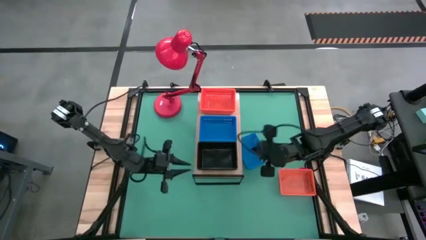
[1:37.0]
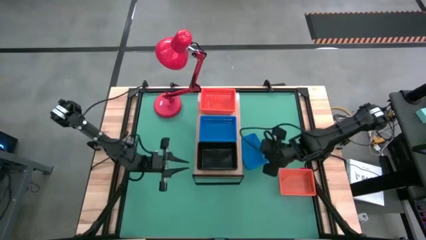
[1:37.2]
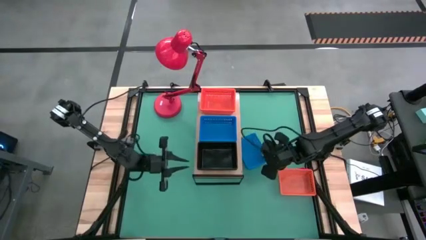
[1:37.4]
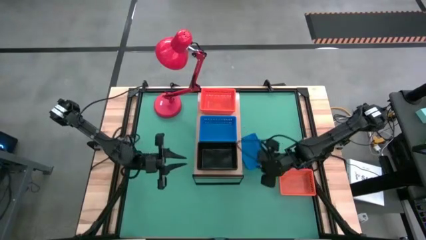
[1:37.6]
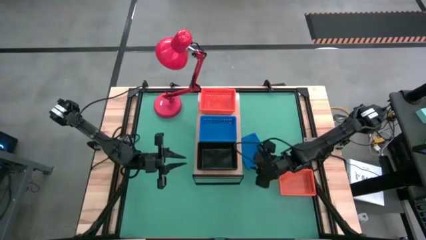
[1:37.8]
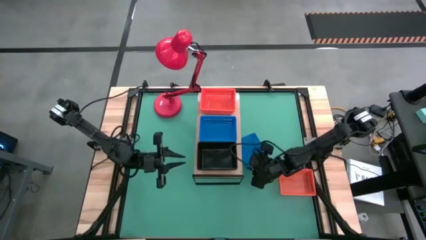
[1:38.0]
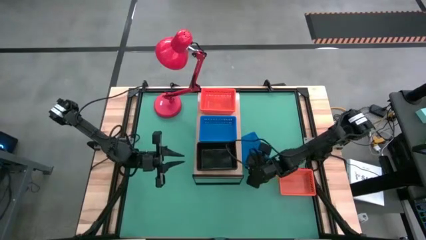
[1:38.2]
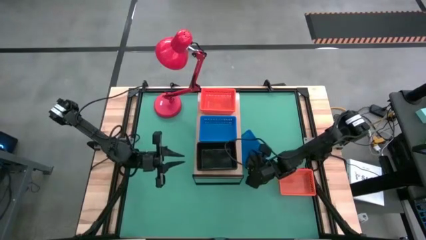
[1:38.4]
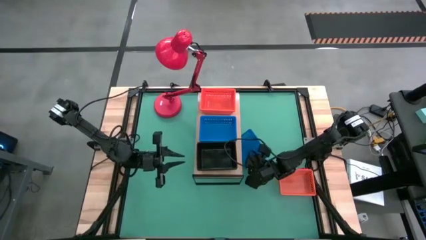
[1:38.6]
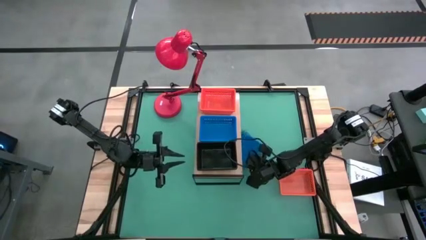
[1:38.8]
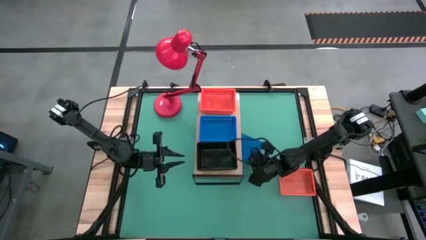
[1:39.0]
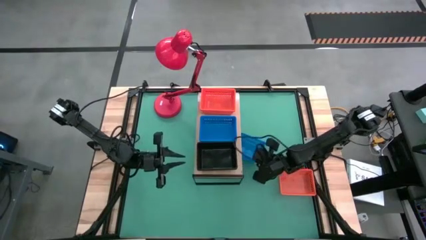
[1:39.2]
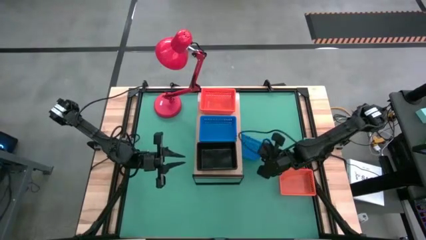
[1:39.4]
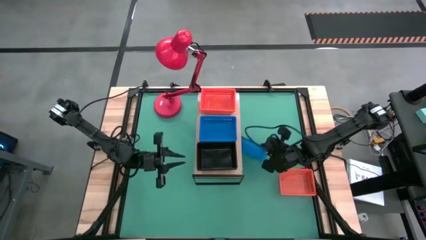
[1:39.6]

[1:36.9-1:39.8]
Task: Stack baskets on shelf by color
Stack the blue bin on top of the blue bins on the shelf

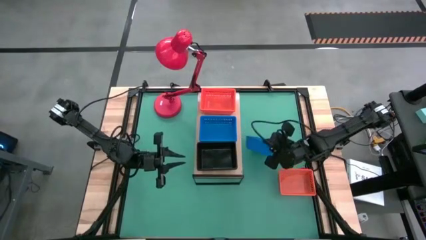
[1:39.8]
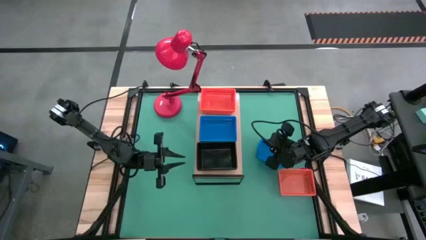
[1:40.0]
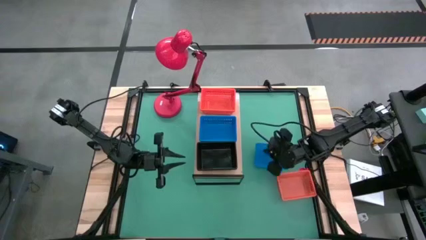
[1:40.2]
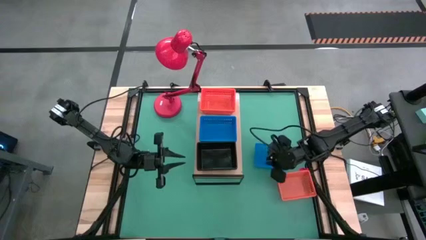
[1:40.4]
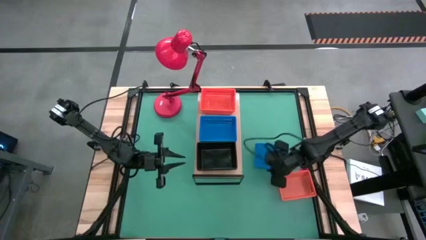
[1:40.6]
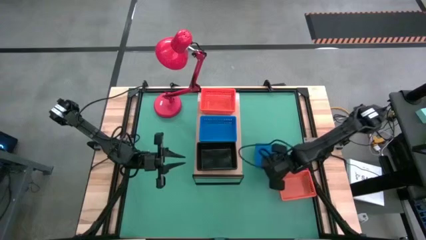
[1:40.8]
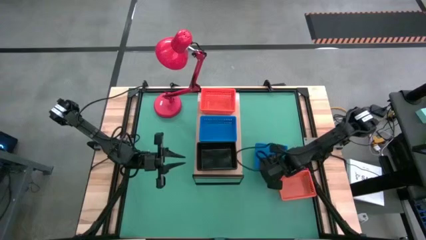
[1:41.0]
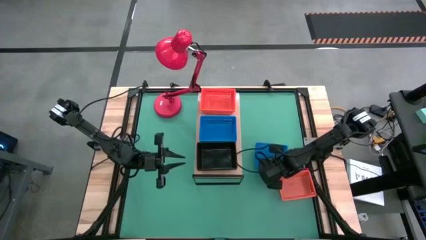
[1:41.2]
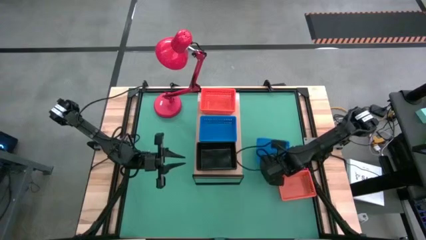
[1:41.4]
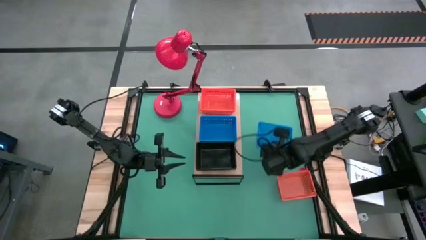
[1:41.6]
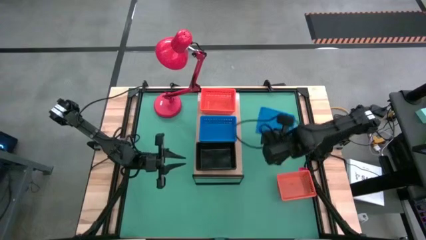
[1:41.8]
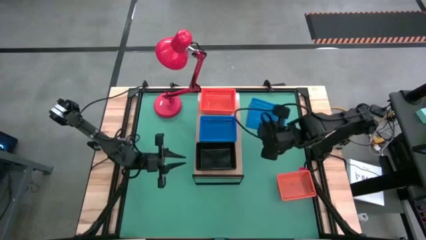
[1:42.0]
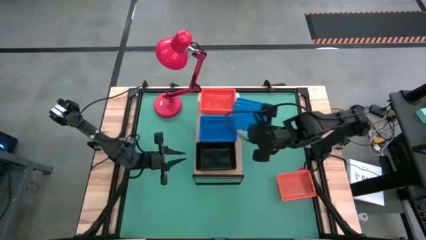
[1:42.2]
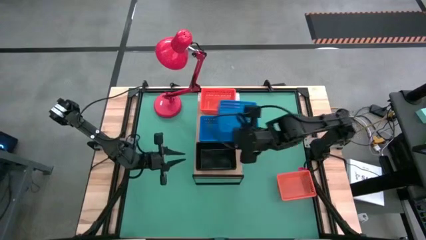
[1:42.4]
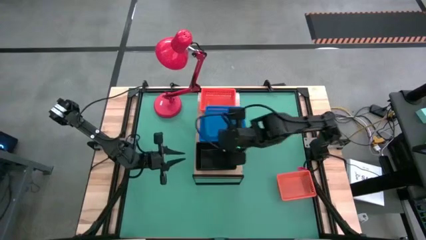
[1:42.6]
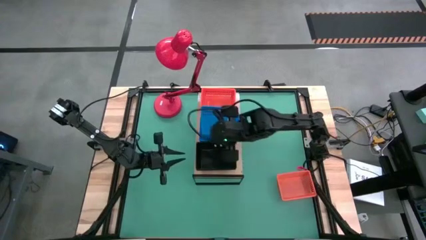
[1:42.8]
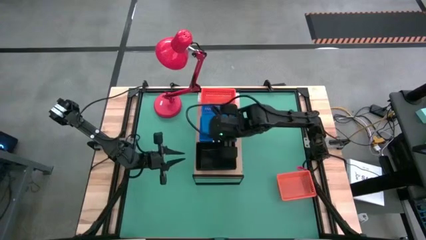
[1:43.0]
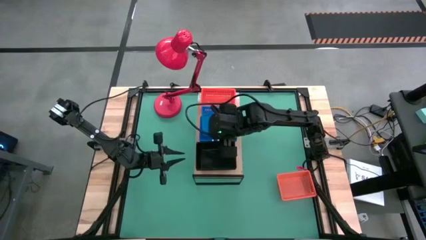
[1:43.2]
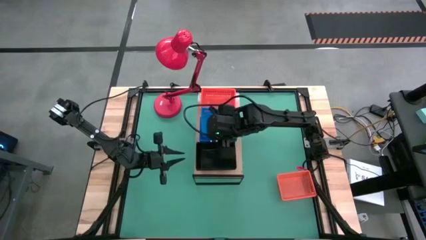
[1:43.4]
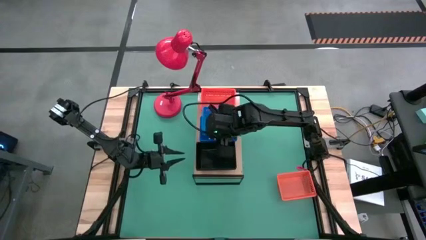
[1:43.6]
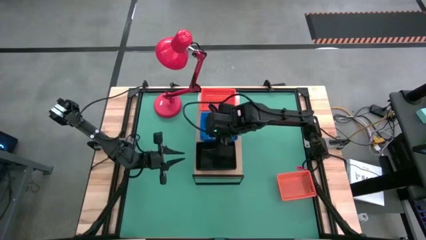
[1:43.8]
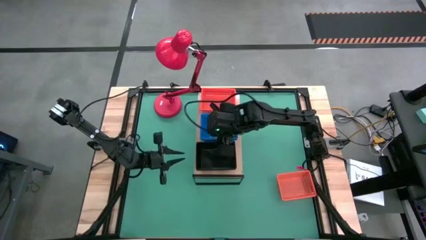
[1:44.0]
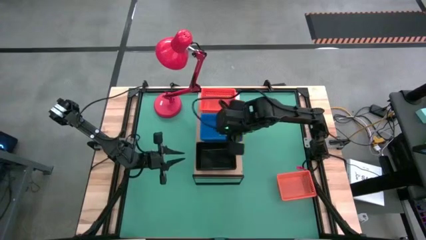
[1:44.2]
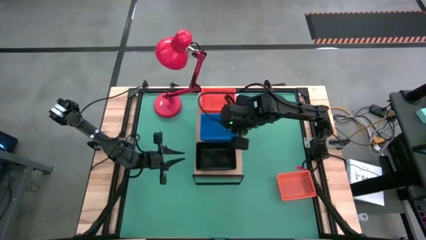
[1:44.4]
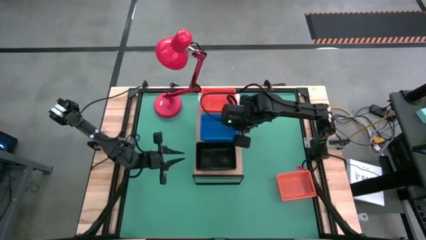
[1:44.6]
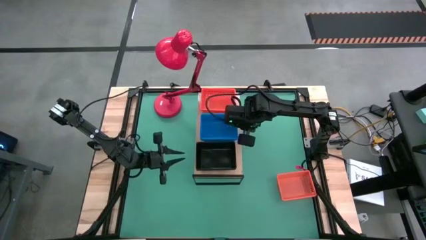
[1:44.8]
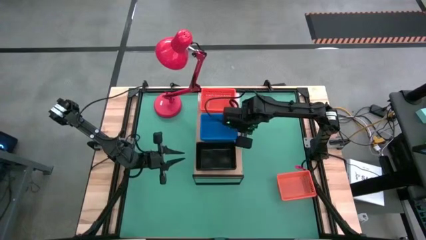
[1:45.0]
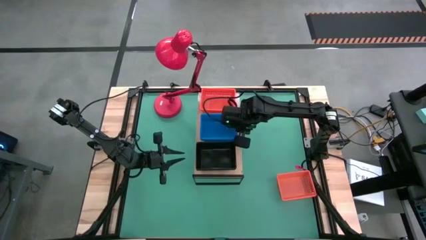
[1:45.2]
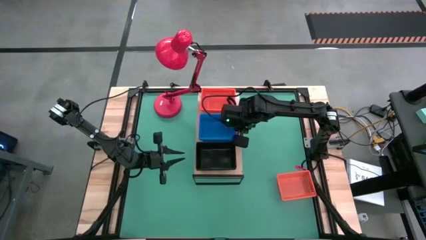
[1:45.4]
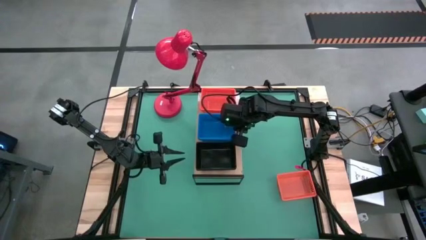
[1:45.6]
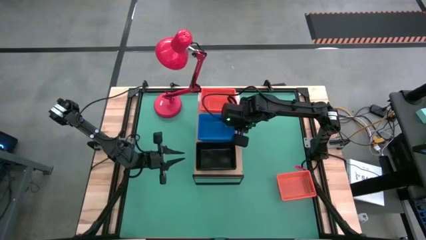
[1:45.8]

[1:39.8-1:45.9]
Stack the blue bin on top of the blue bins on the shelf

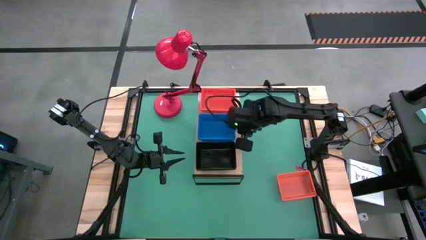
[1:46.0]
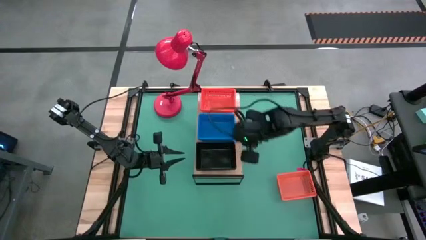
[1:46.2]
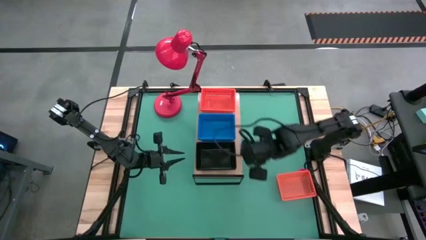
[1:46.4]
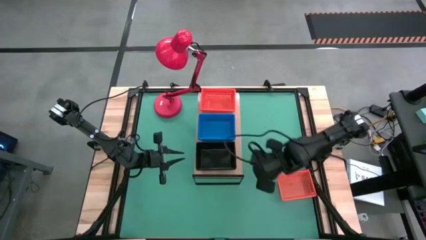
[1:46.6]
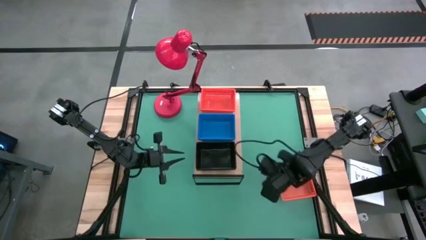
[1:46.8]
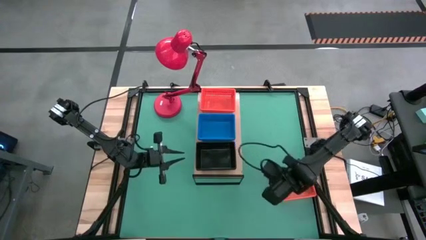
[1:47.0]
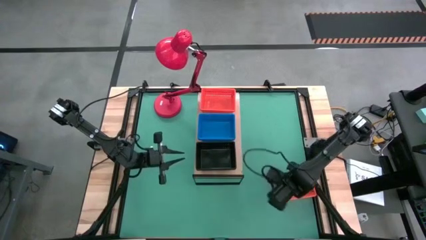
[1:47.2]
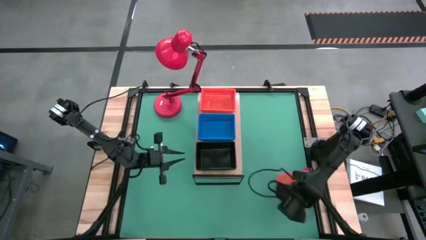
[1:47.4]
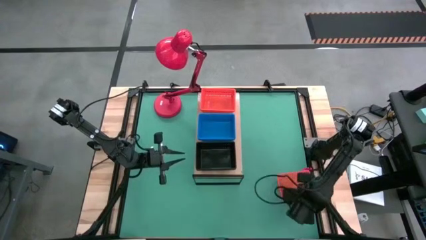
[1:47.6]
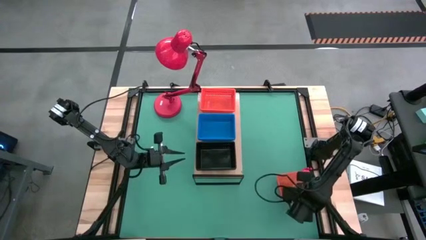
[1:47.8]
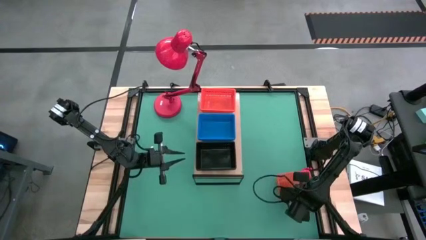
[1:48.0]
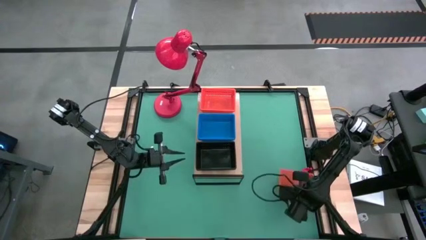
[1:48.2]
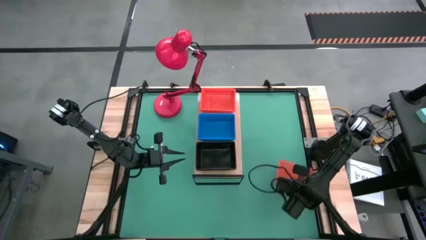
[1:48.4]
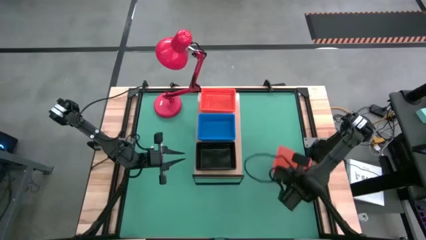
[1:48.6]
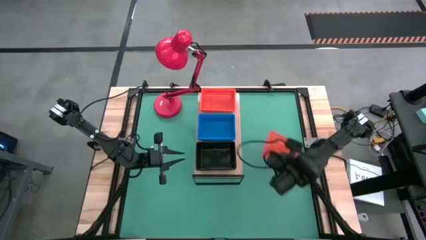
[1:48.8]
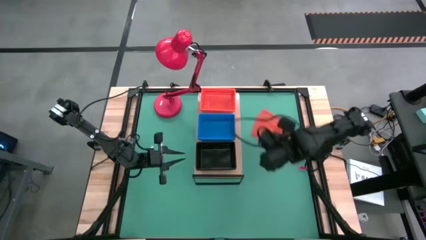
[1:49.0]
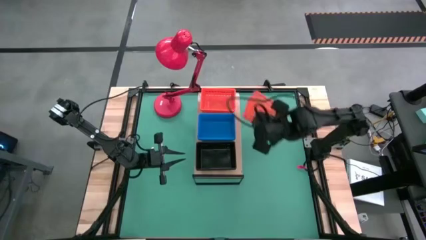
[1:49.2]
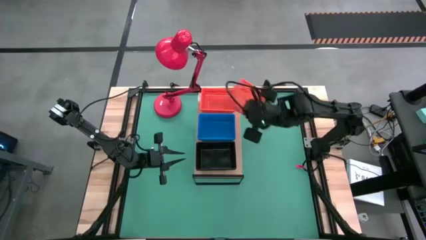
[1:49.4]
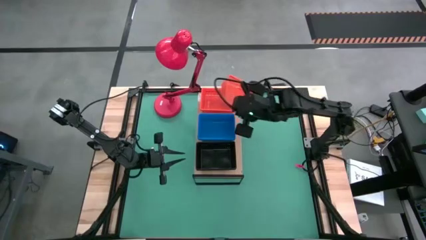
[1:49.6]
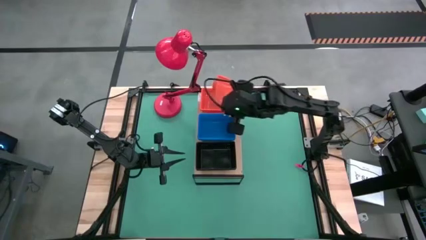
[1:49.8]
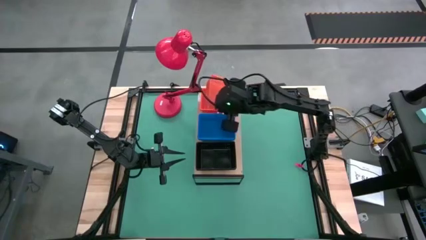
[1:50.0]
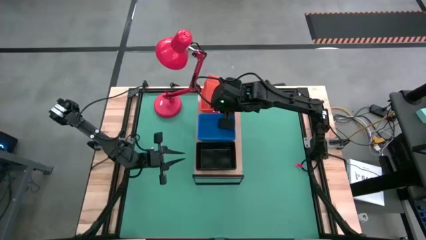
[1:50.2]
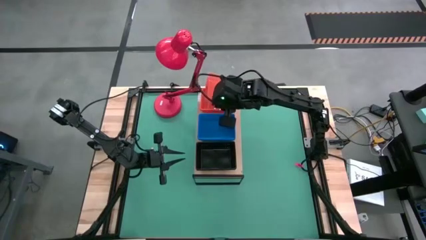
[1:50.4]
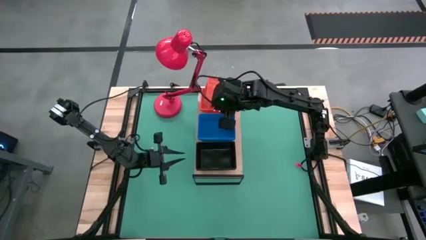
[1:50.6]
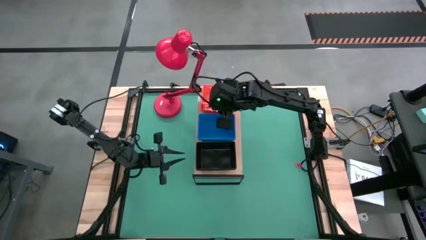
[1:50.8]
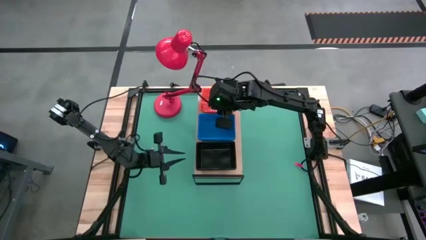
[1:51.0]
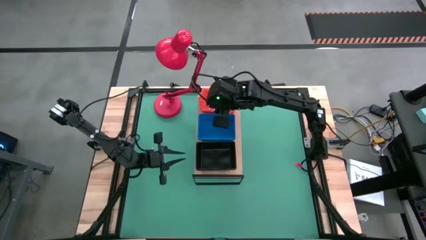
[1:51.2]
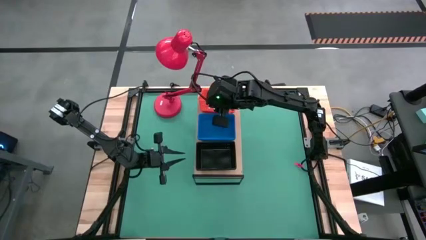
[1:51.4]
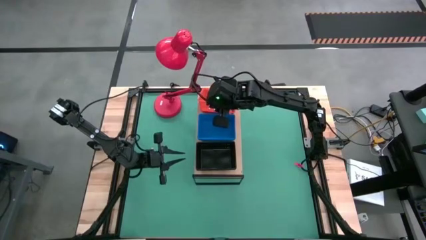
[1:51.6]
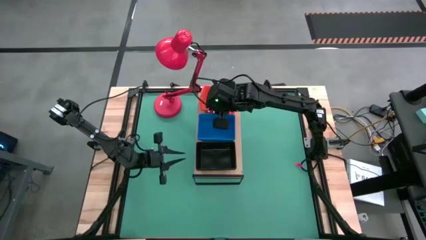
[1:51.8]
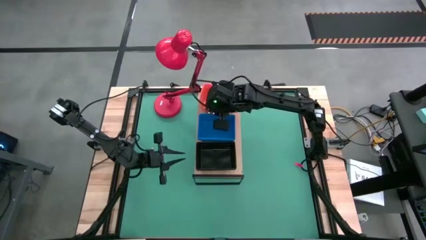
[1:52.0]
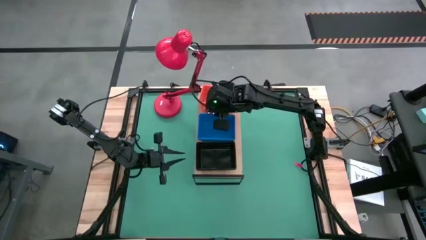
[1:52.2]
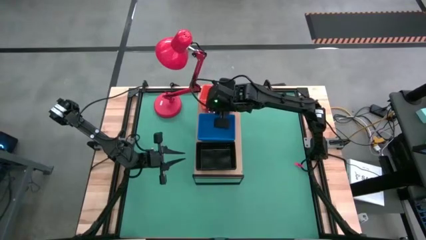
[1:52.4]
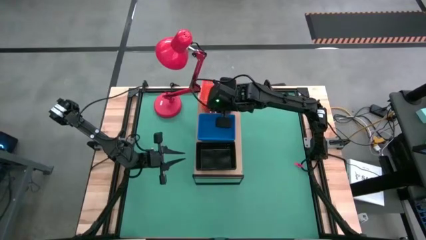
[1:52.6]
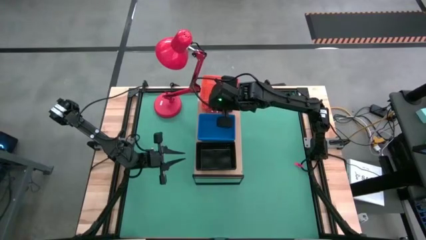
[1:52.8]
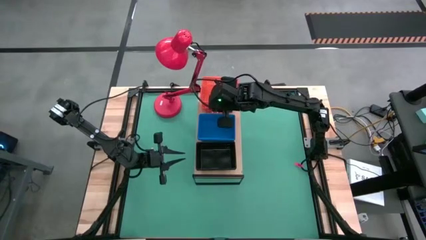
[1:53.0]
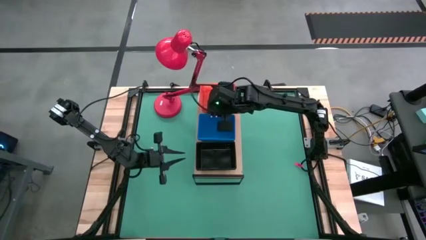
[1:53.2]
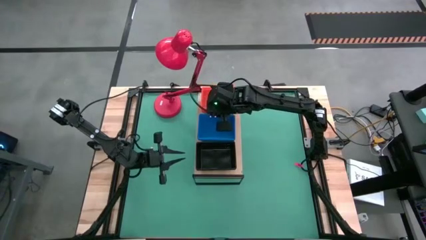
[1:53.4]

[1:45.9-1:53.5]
Stack the orange bin on top of the orange bins on the shelf

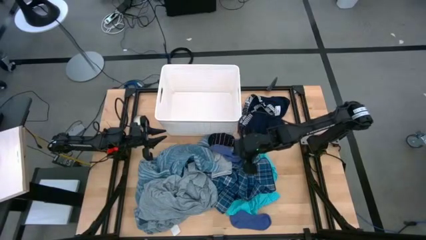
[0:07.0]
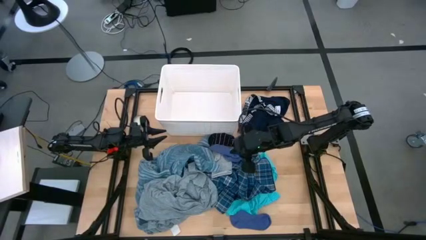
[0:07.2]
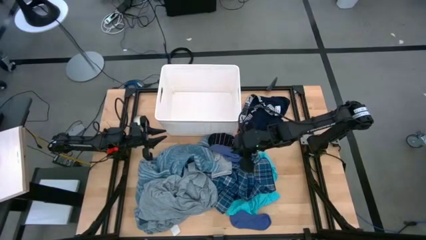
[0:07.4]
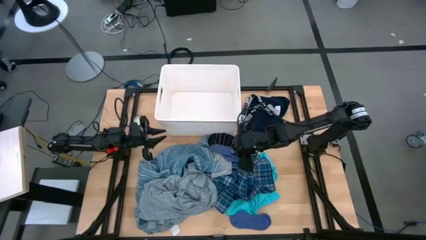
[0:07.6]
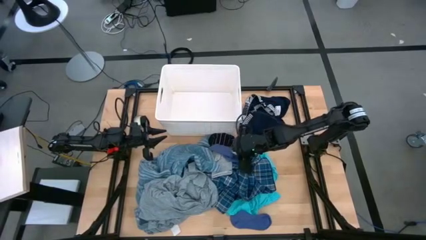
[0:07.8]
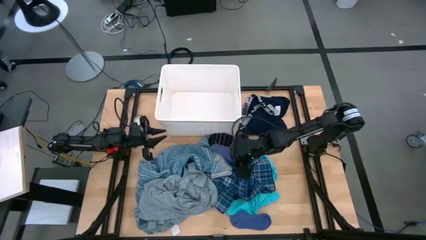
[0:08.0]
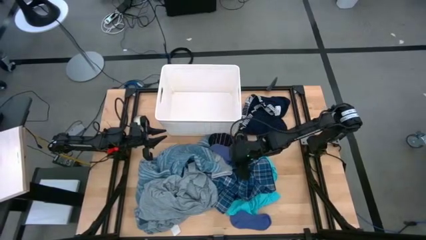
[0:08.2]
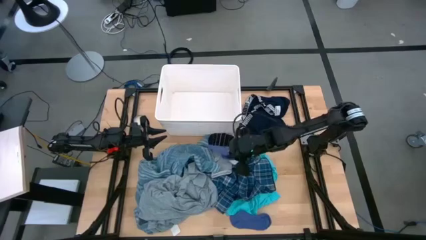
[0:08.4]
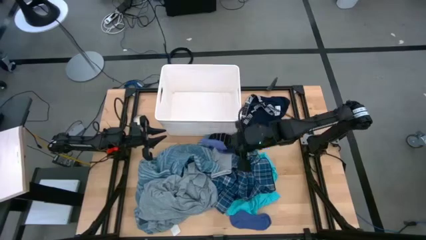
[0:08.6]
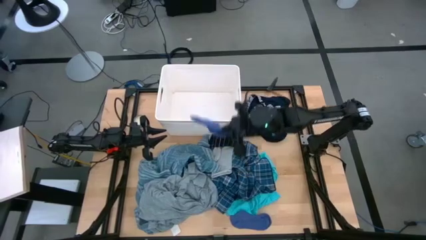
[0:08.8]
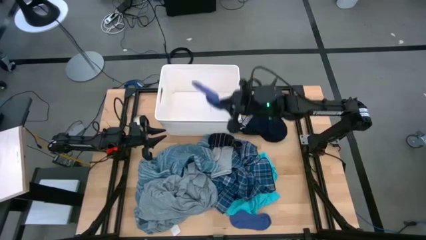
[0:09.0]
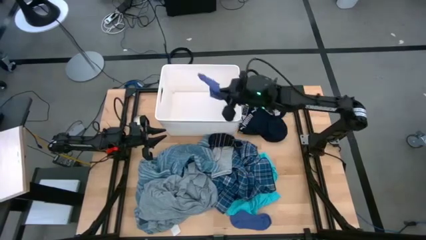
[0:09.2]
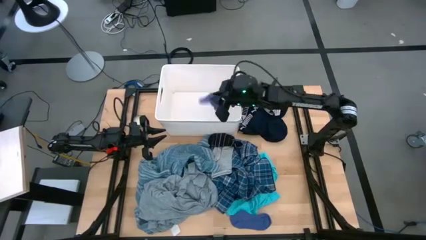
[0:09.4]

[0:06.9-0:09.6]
Task: Sort clothes
Put the blue sock into the white laundry bin
